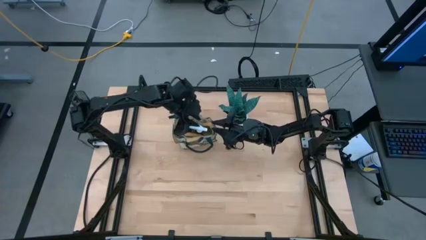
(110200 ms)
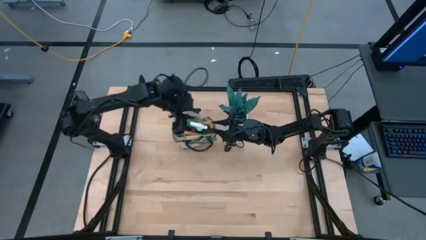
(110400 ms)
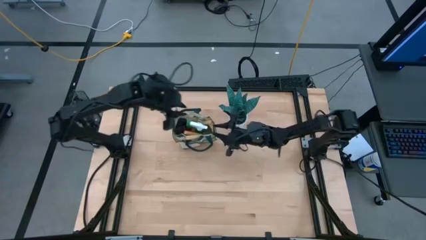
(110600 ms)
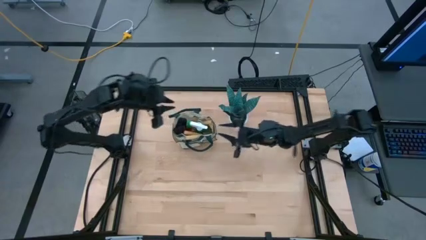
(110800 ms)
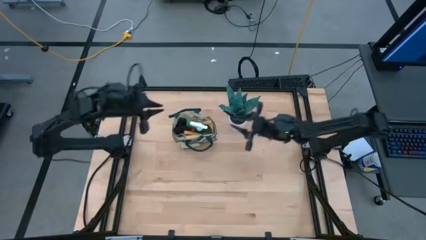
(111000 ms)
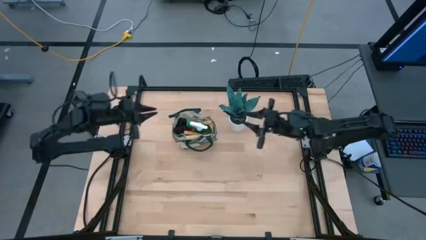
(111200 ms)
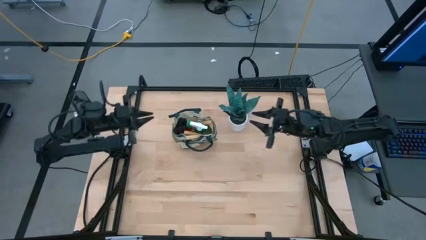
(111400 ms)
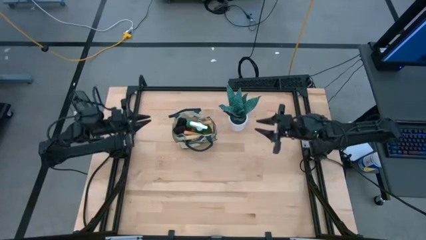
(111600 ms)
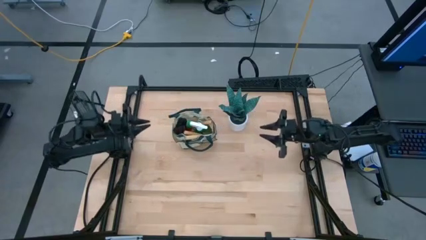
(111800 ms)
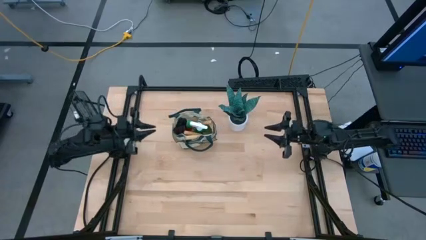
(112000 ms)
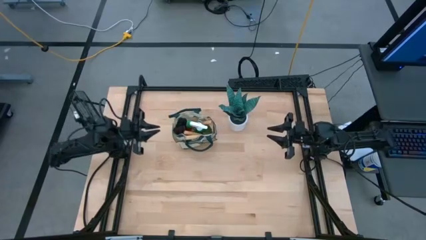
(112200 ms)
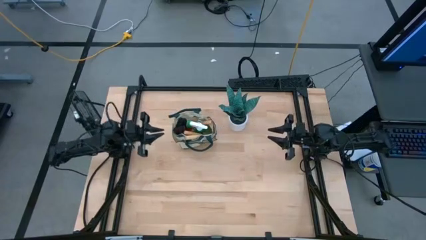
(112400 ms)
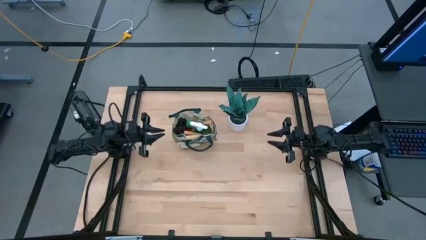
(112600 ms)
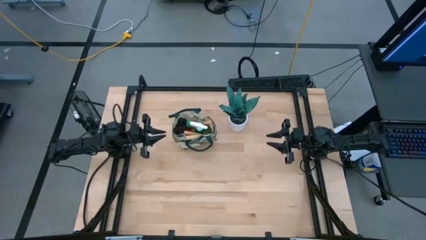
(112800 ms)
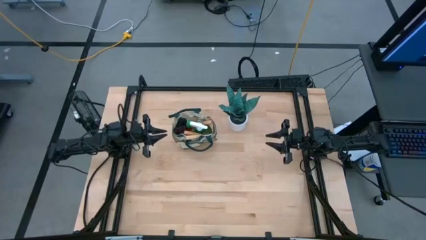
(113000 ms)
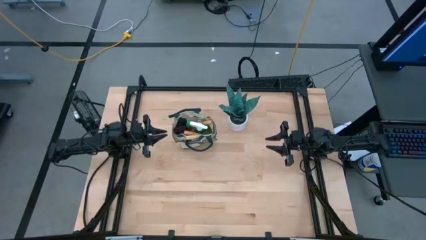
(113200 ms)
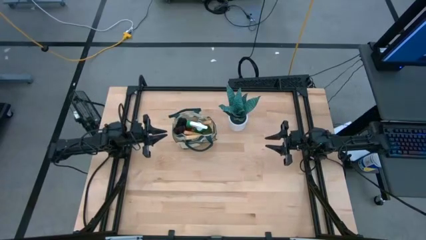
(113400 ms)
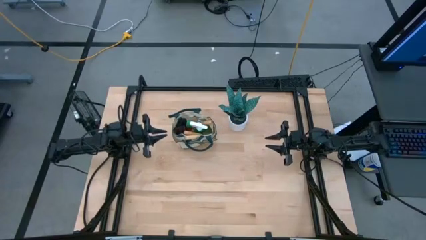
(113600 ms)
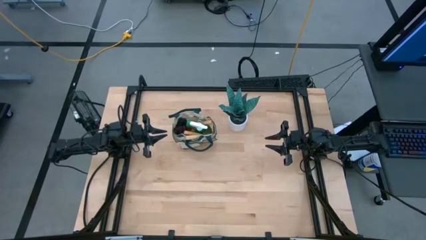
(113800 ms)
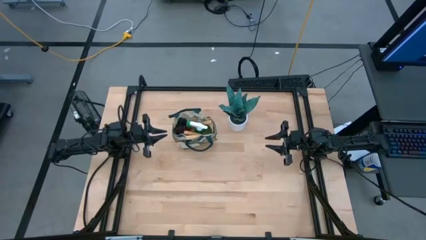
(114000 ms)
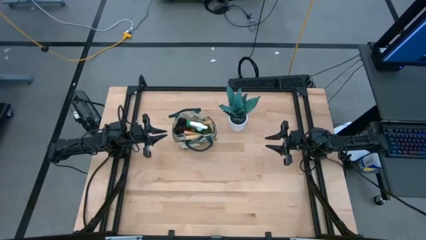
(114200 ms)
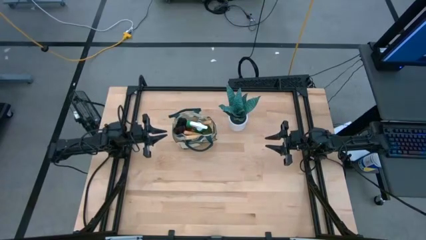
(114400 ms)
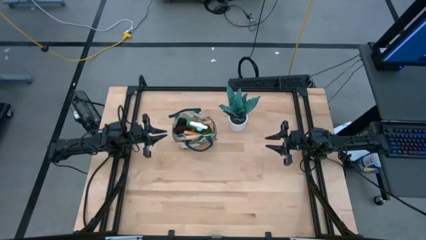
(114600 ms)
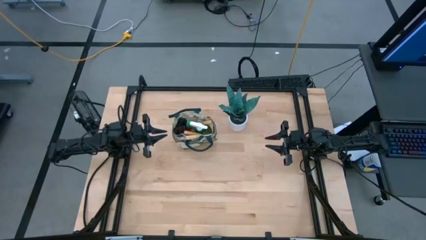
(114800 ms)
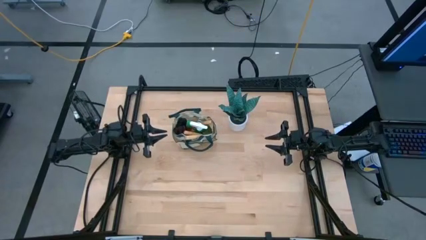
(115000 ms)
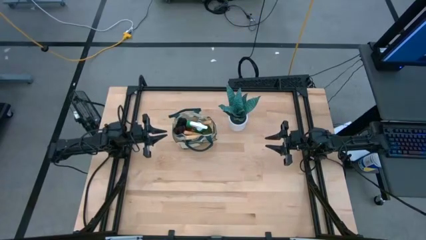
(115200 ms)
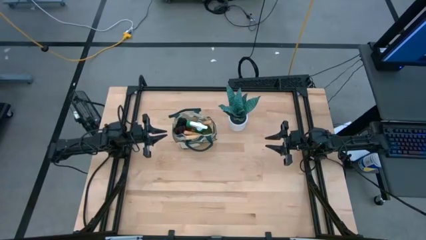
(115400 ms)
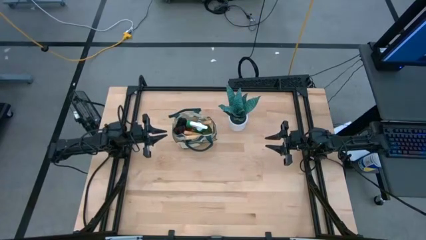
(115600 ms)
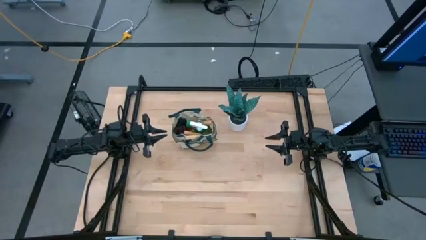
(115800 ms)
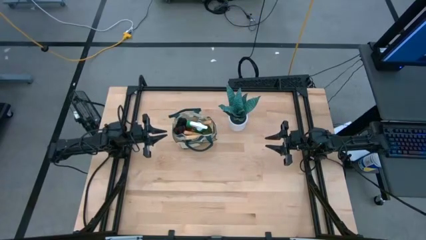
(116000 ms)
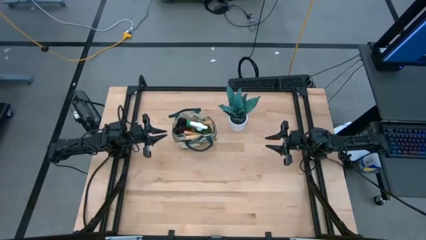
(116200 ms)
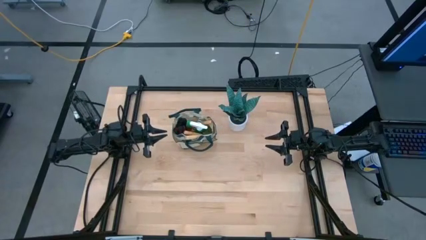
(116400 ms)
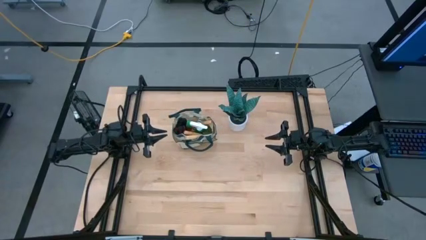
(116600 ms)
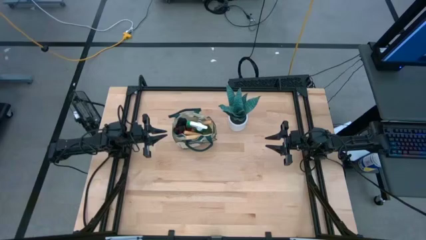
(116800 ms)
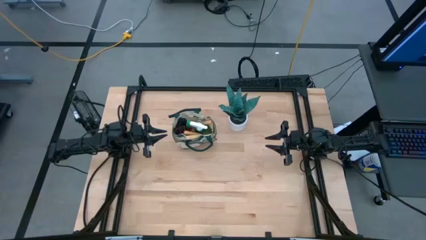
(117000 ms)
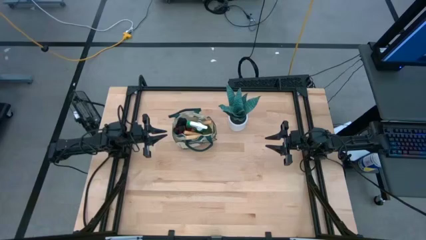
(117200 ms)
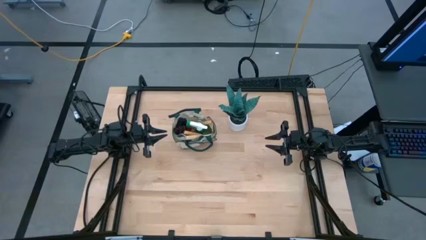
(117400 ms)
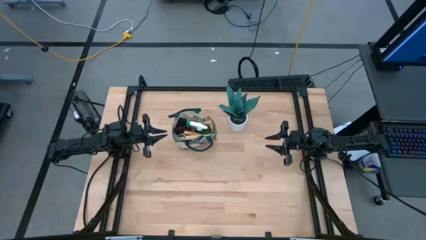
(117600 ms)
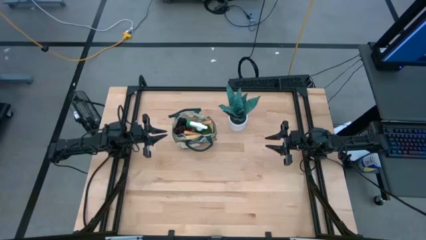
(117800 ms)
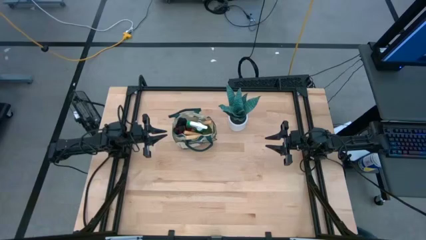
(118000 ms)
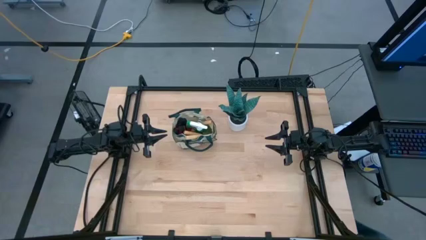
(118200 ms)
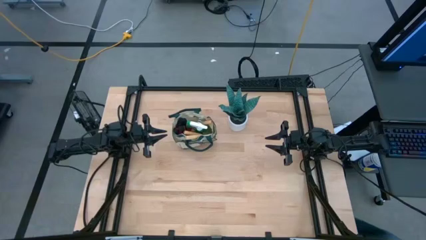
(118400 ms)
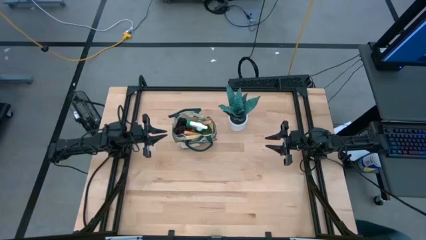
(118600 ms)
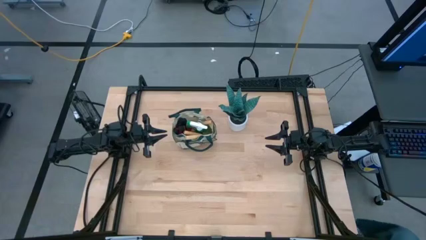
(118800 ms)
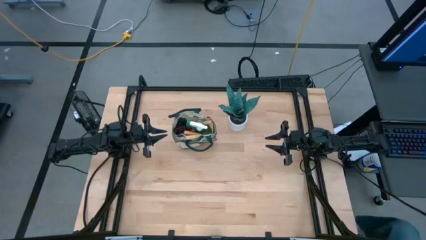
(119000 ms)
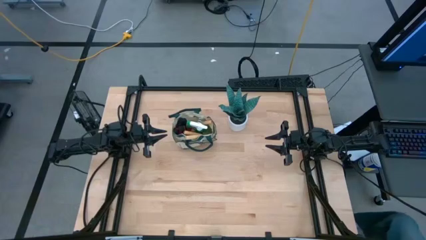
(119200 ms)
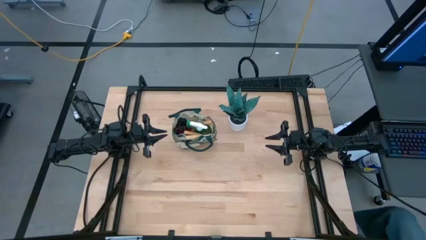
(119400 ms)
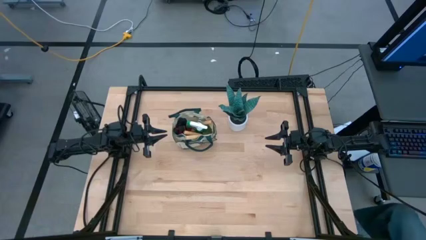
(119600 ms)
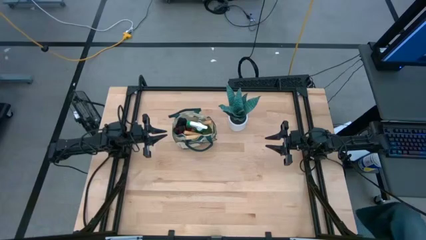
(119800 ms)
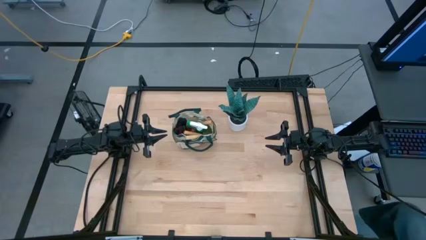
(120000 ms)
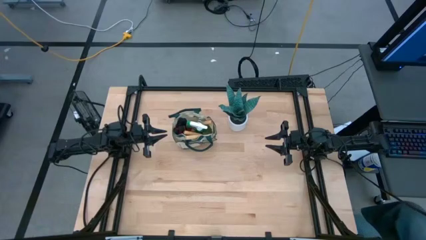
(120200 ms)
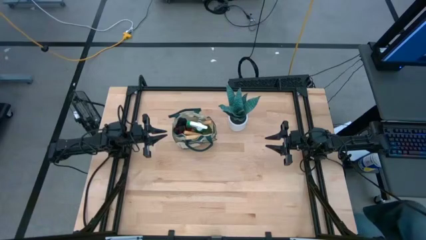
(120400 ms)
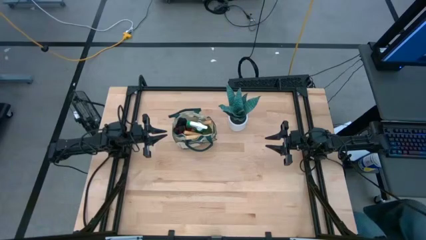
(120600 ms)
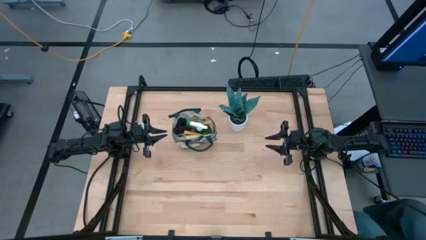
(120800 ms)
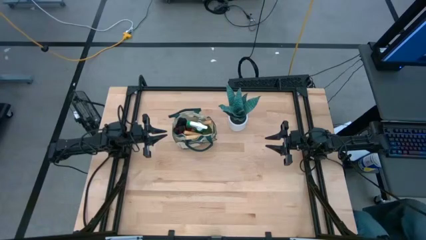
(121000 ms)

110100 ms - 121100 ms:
Task: Pick & Place Garden tools in Gardening bag
Return to Home Position

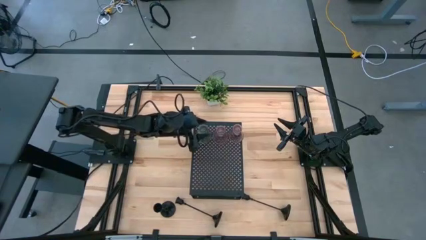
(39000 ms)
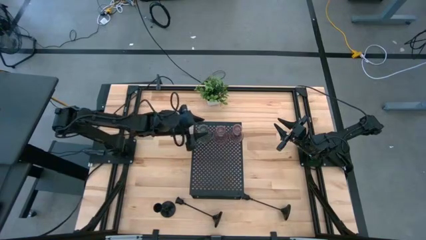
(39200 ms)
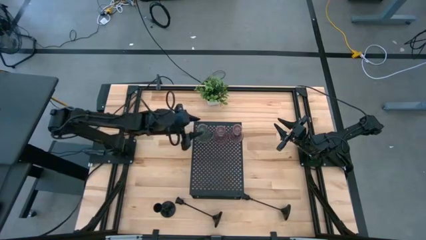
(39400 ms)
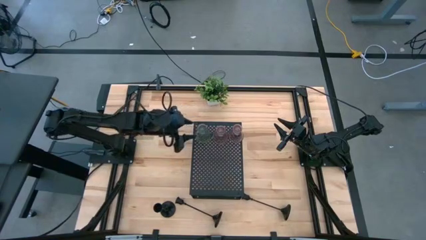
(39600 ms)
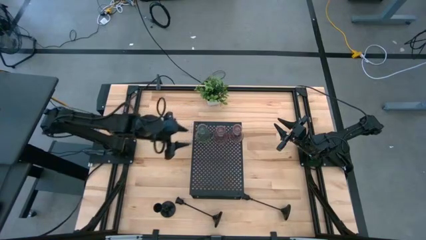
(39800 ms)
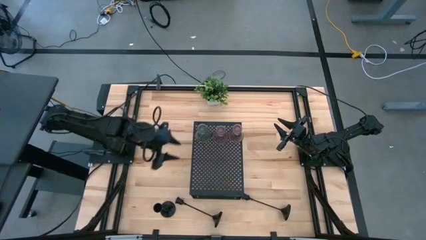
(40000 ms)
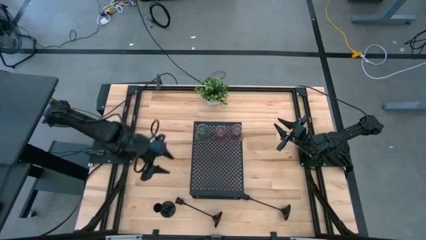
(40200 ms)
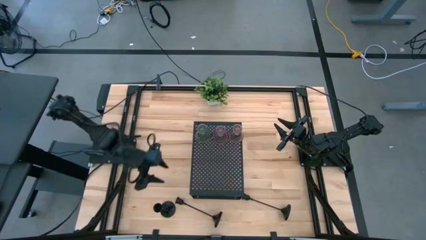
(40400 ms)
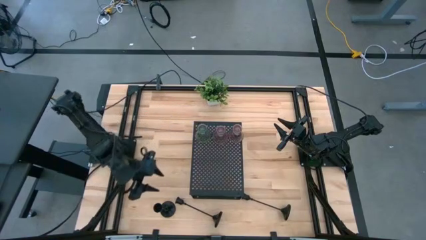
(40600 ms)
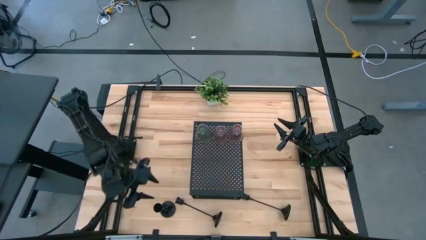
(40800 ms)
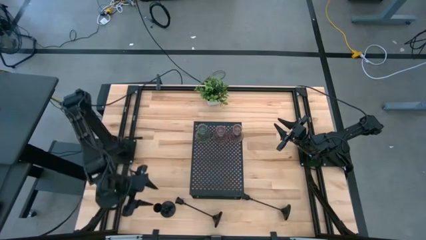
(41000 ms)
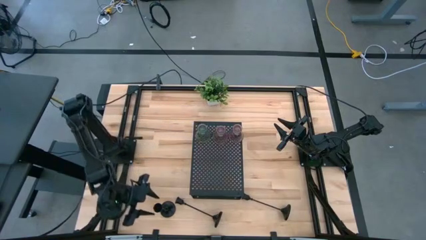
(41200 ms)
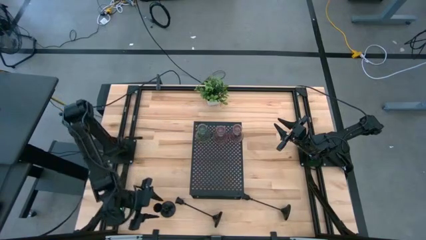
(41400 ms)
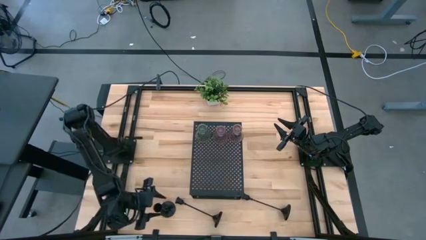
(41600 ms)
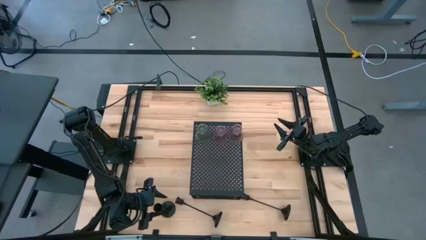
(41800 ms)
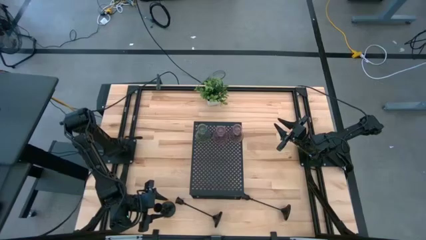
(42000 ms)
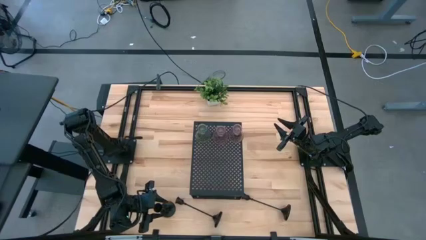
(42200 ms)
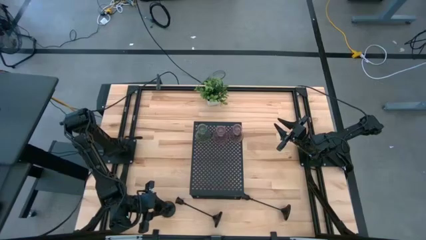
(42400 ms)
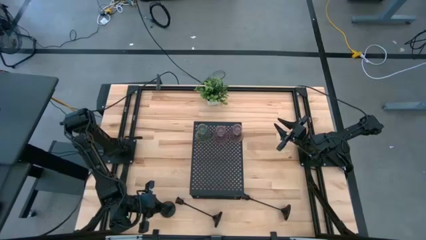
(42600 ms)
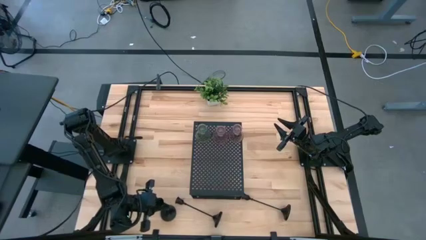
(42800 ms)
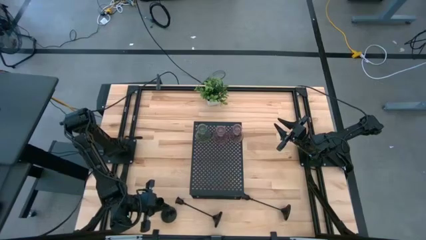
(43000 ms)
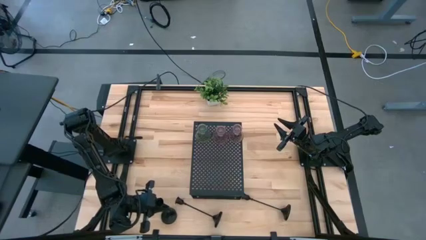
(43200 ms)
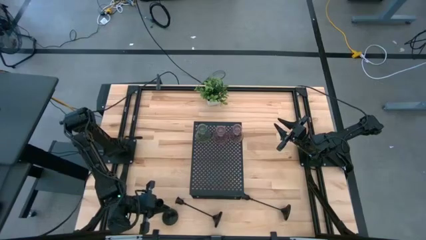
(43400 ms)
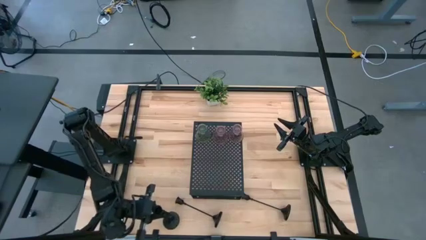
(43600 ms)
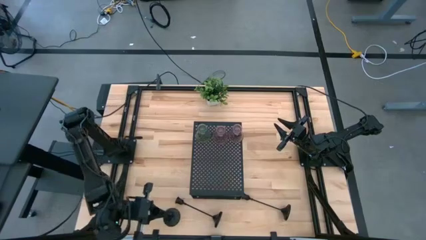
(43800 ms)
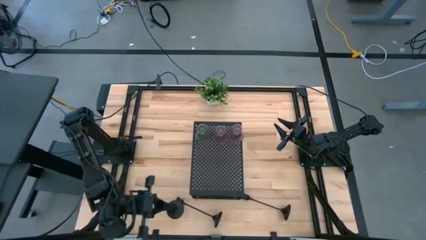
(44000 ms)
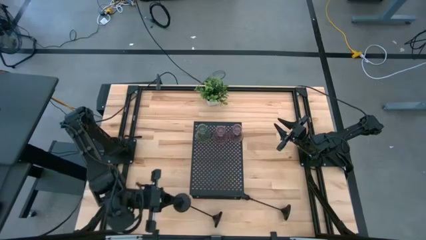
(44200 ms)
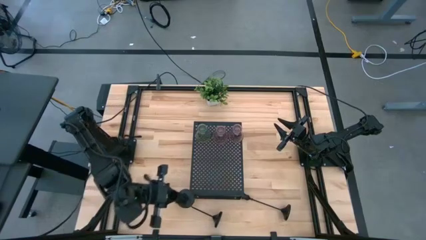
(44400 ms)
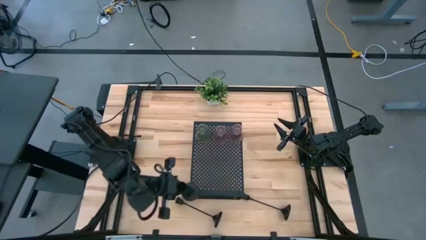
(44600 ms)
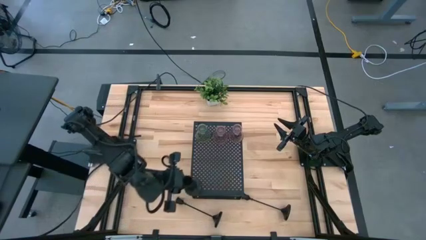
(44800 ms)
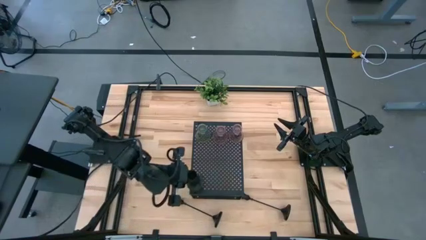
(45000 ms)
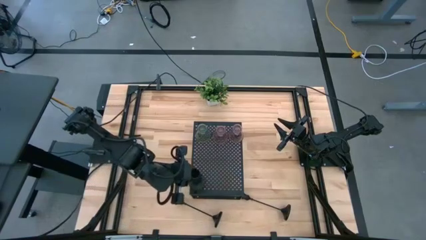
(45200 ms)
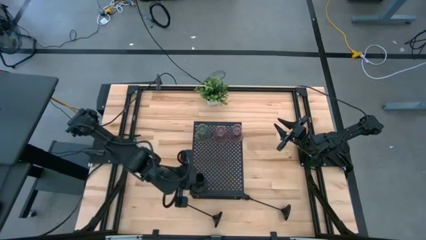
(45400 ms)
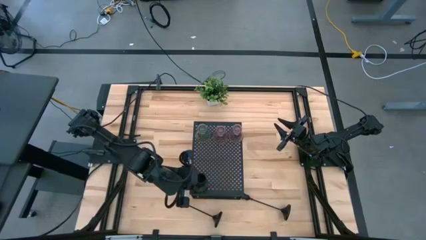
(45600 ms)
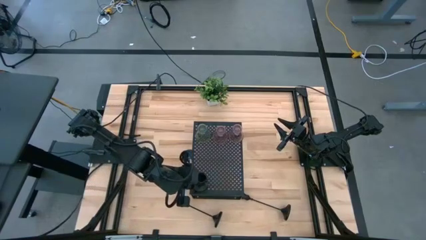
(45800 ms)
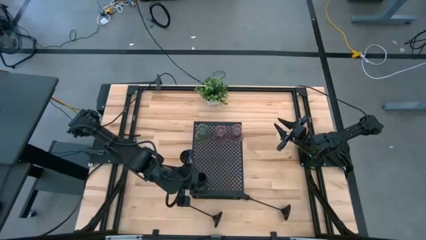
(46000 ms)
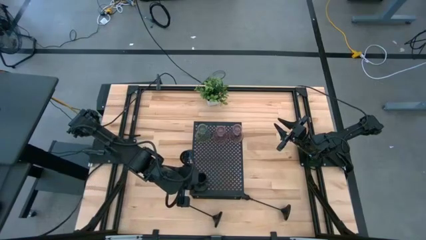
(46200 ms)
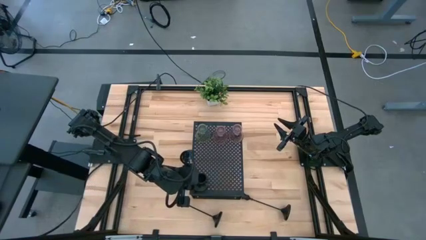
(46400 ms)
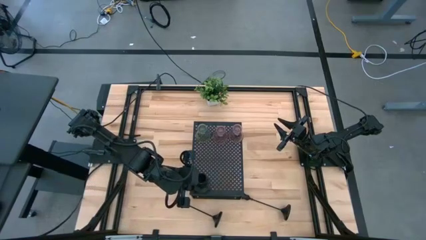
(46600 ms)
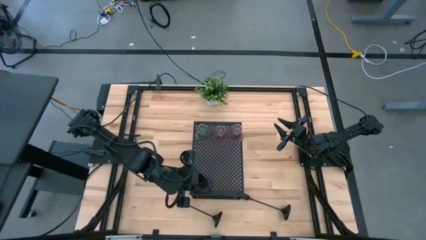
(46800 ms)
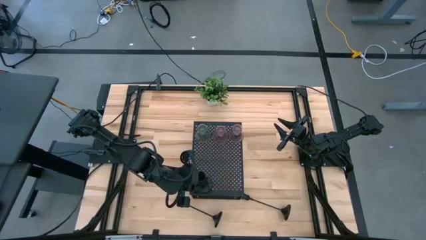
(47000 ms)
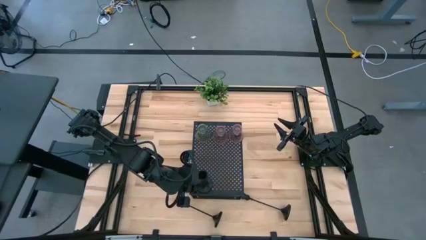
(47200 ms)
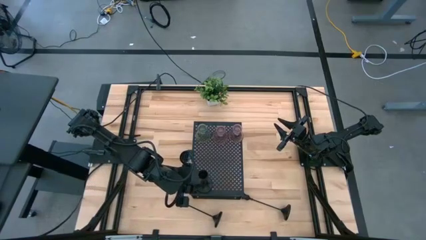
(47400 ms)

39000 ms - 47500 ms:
Task: Pick & Place candle stick holders
Put the left black candle holder on the shelf
